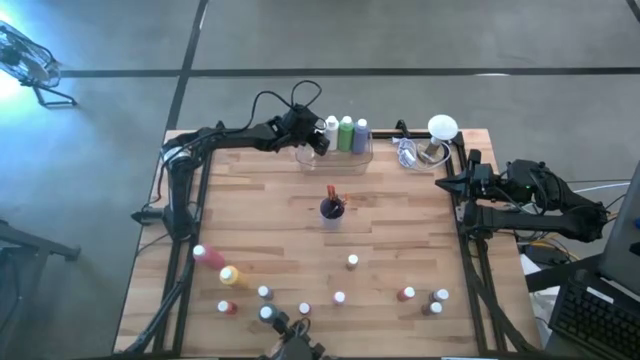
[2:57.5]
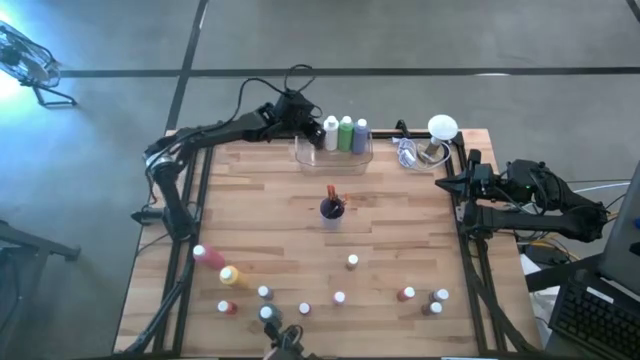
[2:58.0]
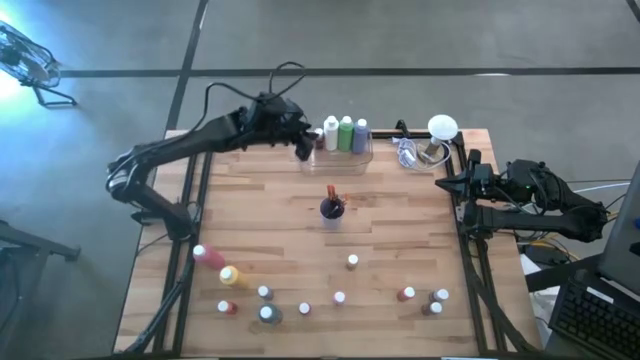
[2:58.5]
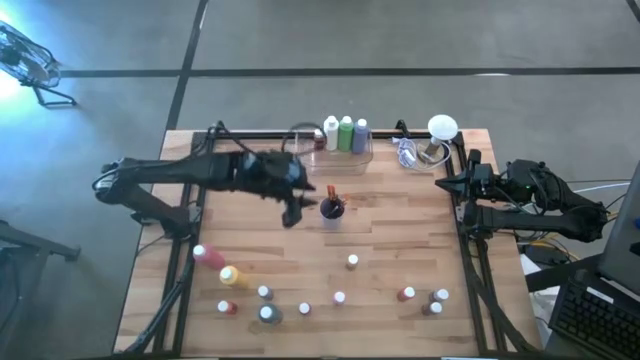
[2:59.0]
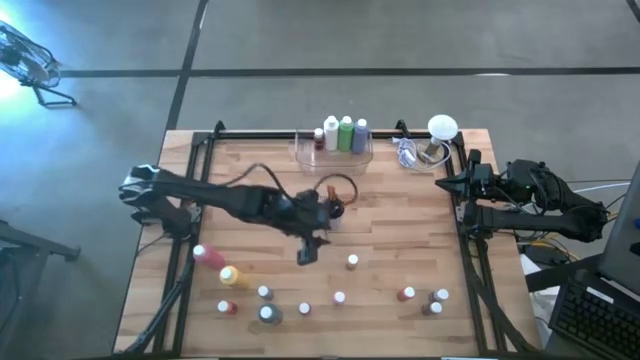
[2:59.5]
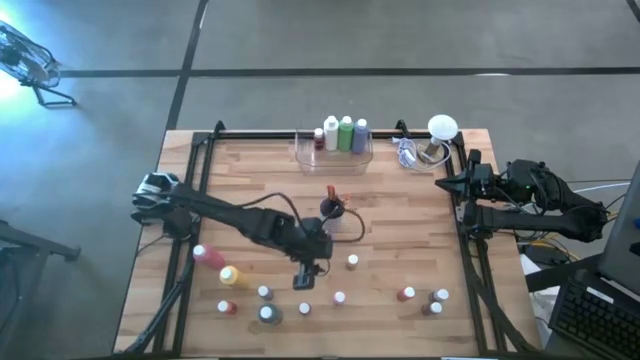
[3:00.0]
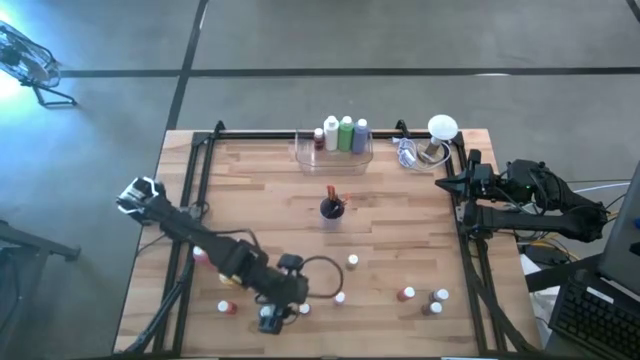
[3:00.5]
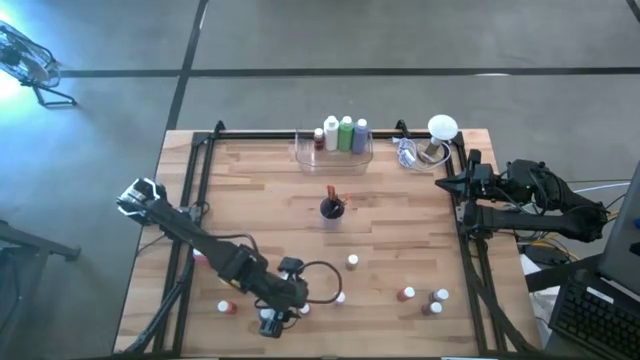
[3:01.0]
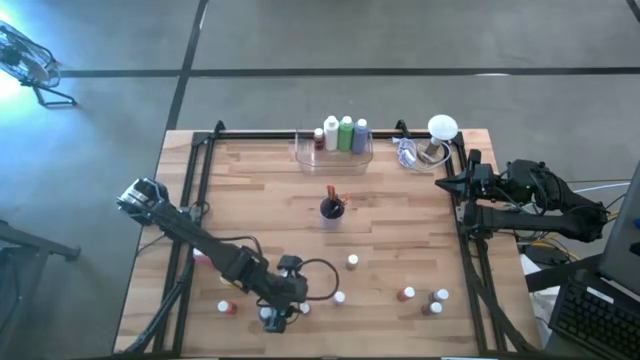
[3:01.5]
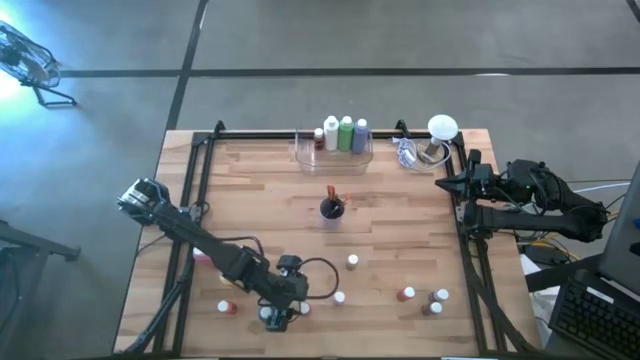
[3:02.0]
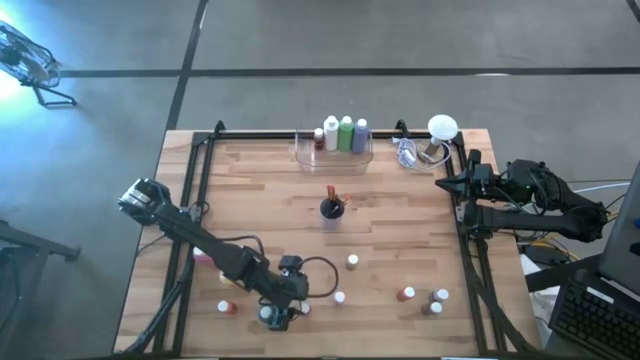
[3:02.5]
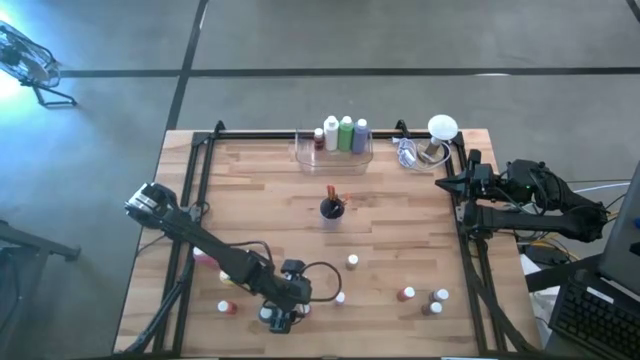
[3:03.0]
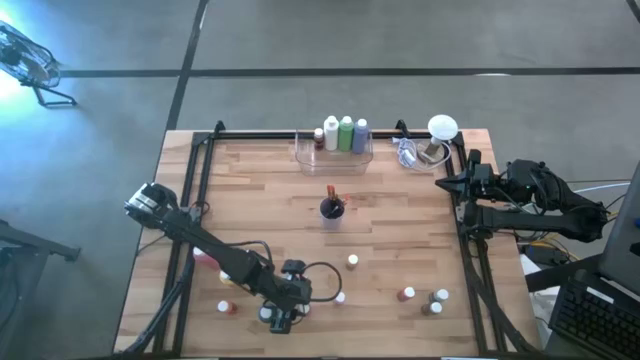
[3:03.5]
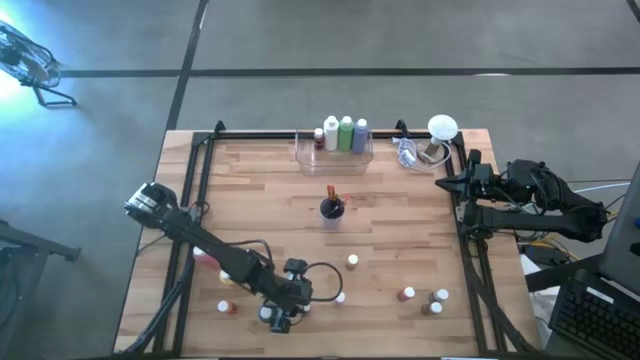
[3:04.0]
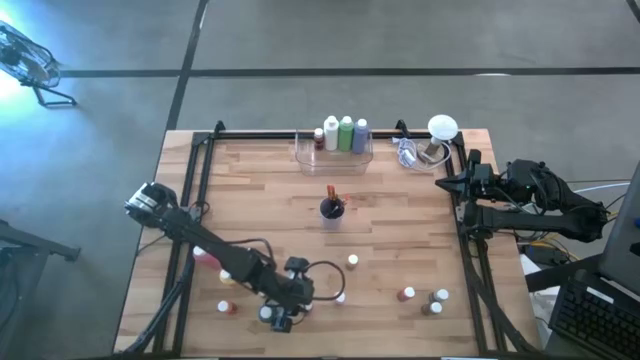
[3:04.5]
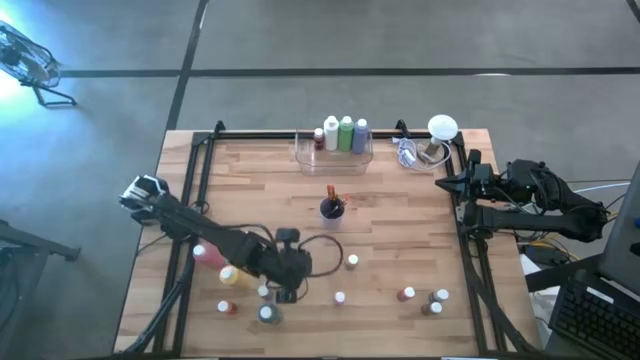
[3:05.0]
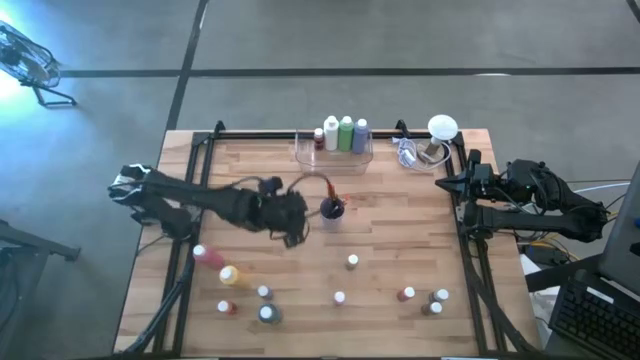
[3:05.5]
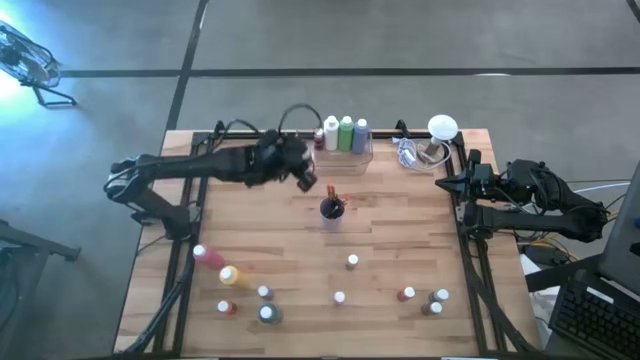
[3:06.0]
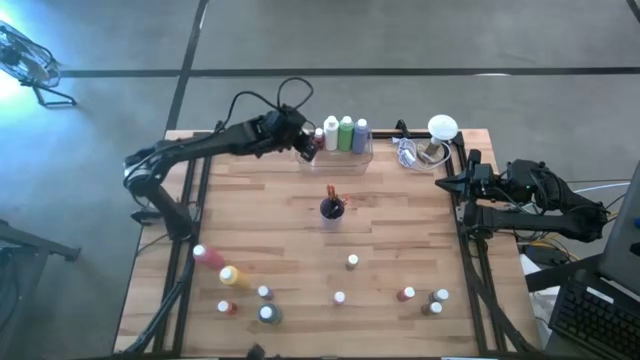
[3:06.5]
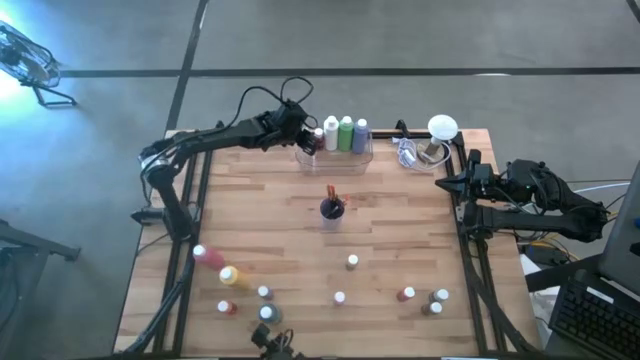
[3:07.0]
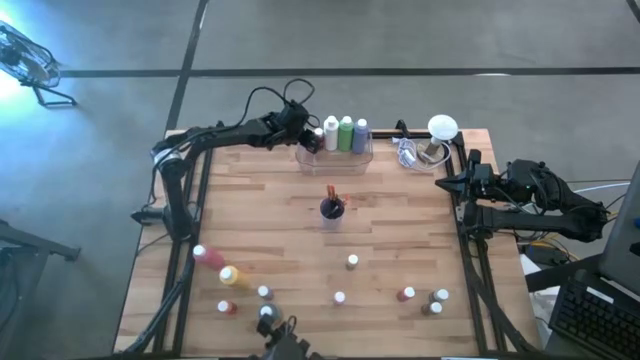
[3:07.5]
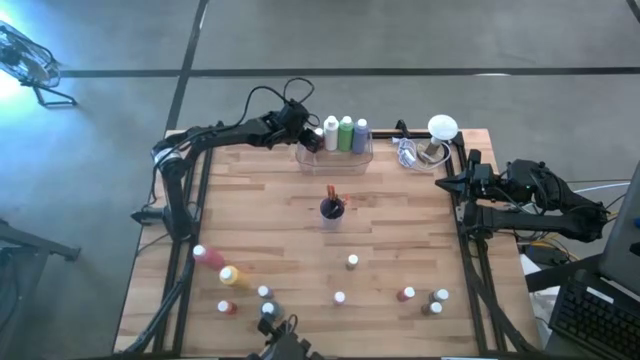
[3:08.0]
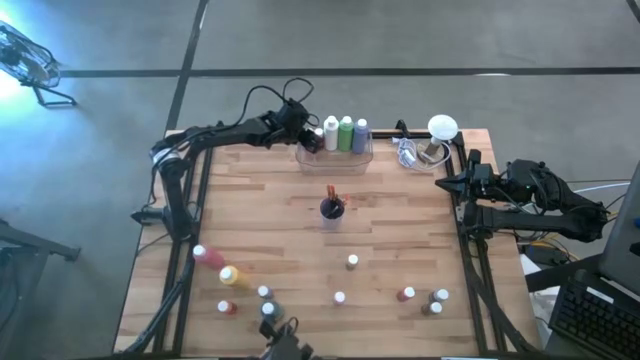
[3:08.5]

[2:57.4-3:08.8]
Task: Pick & Place Paint Supplies
Put the pink black paint bottle into the transparent bin

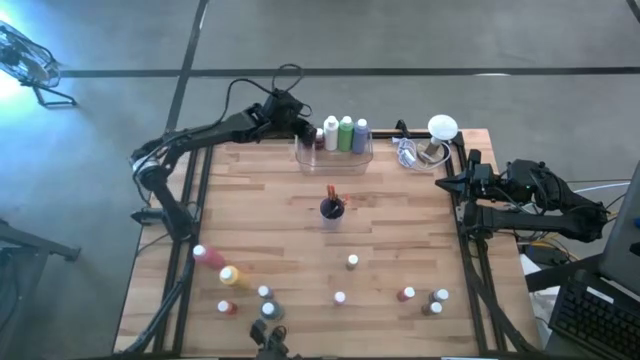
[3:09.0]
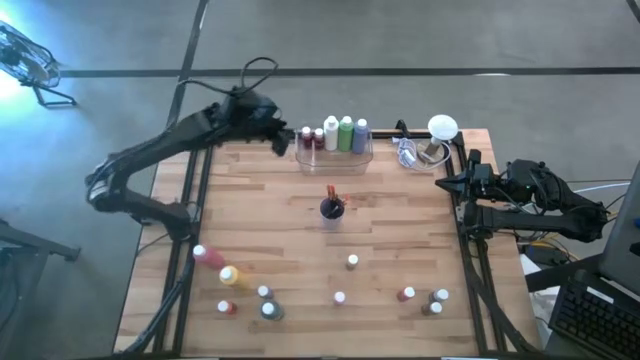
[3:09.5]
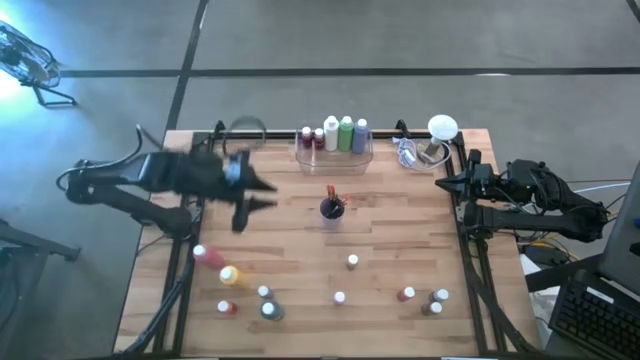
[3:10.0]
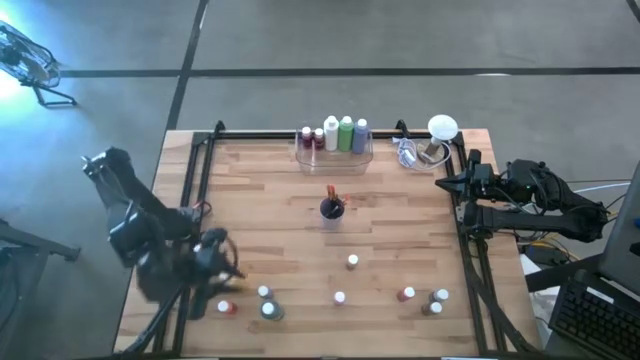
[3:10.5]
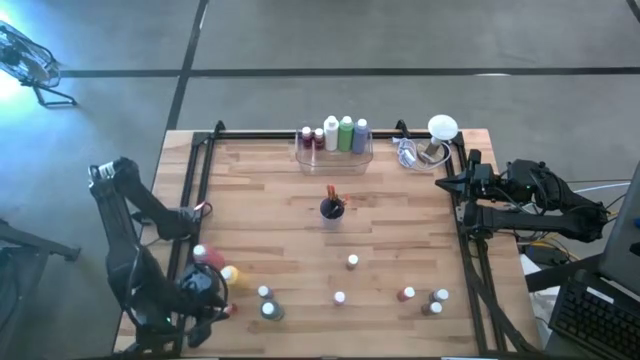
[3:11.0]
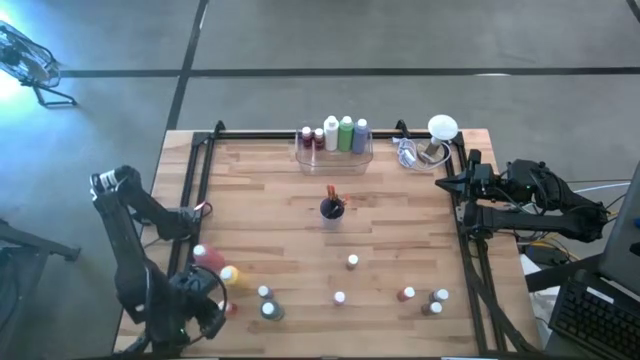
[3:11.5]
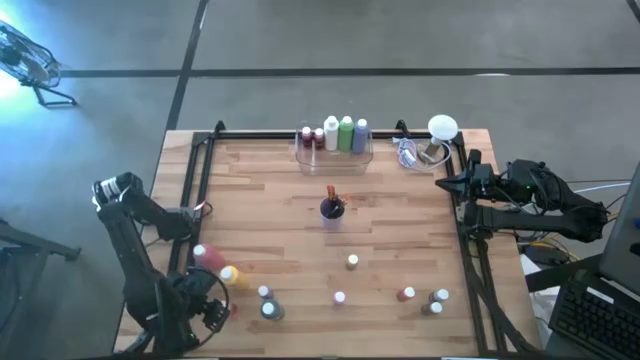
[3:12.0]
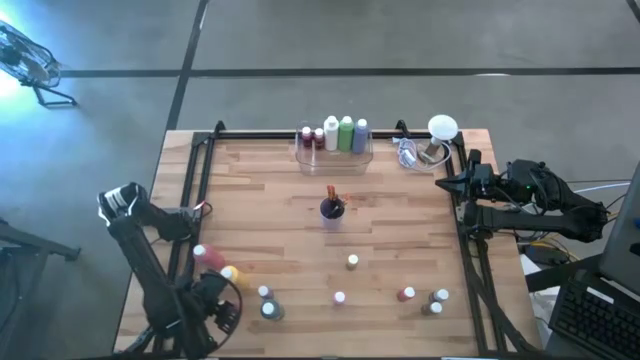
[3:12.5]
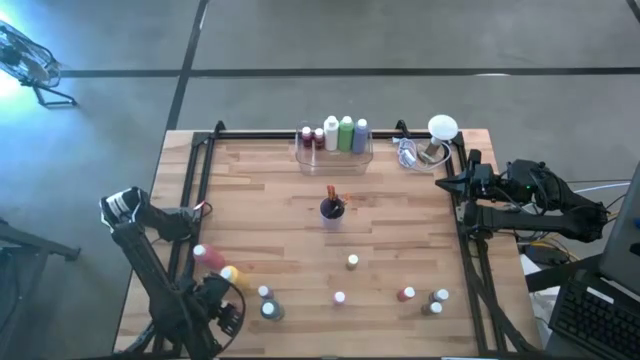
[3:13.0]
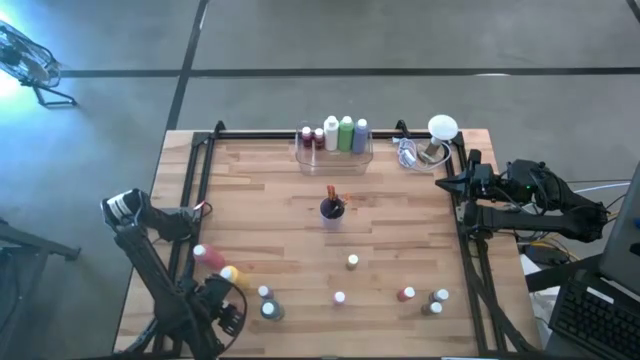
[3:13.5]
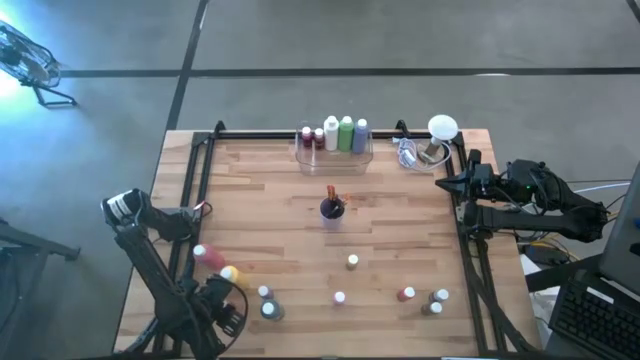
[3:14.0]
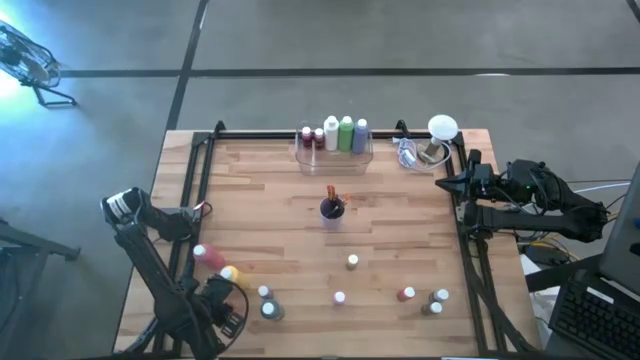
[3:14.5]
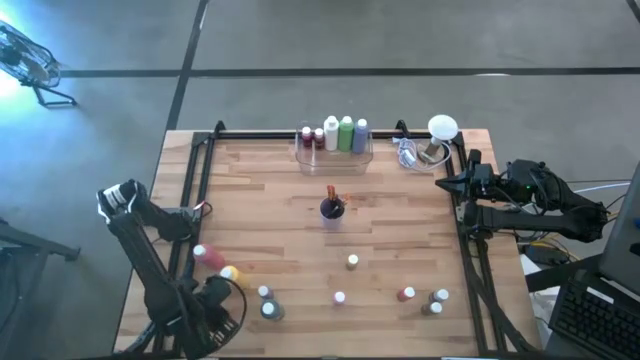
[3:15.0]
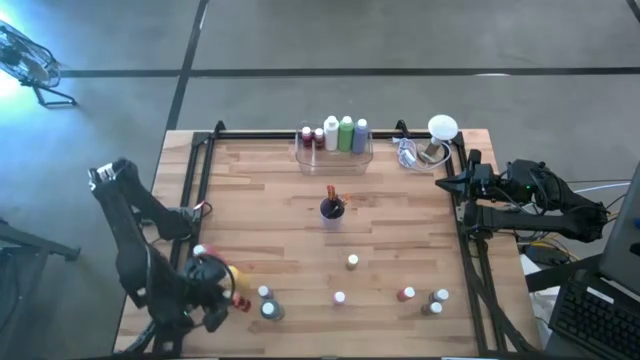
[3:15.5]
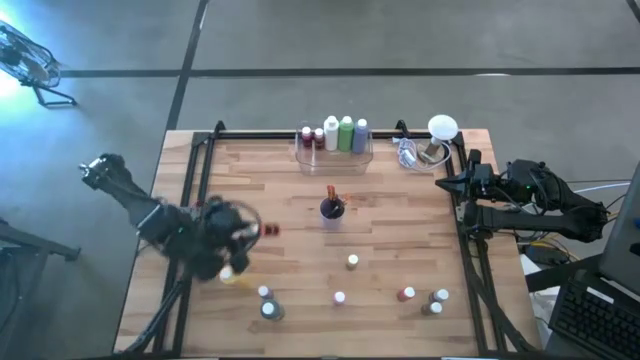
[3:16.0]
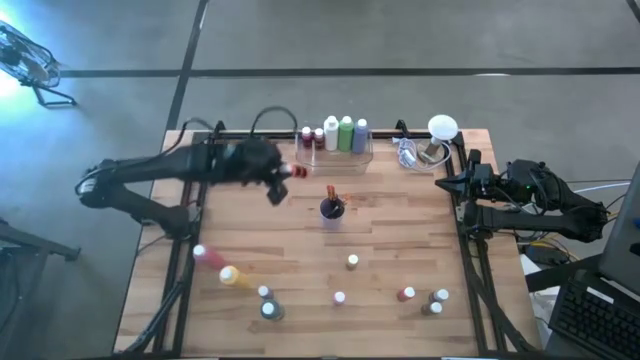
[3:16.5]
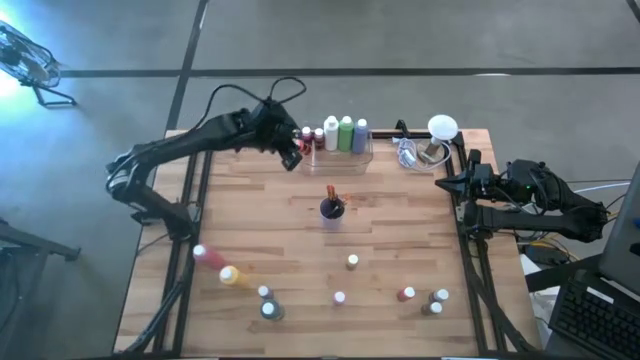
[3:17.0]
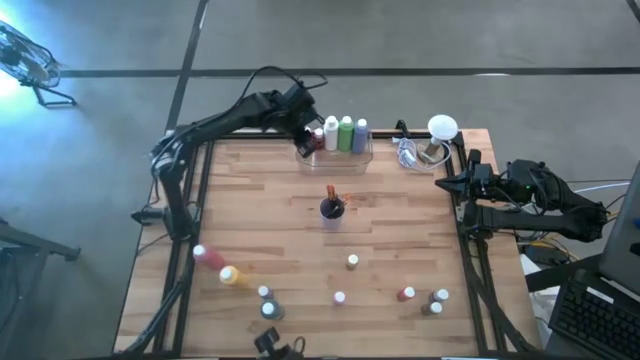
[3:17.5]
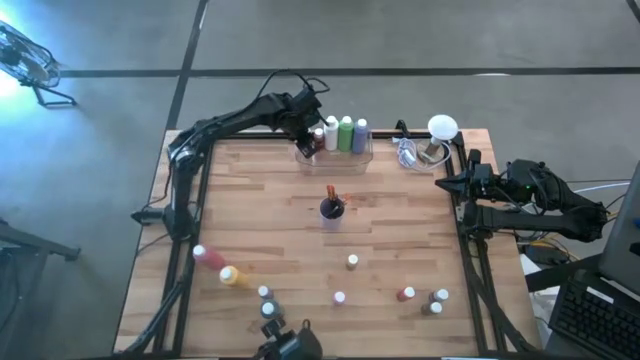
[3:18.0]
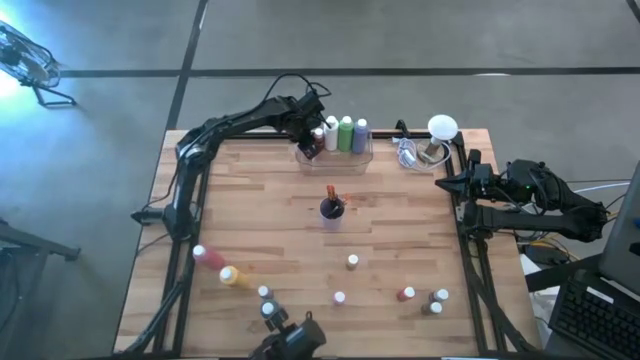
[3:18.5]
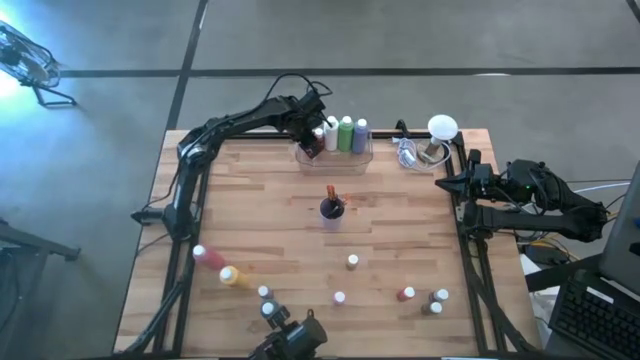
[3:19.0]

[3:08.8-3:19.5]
Put the orange black paint bottle into the transparent bin
